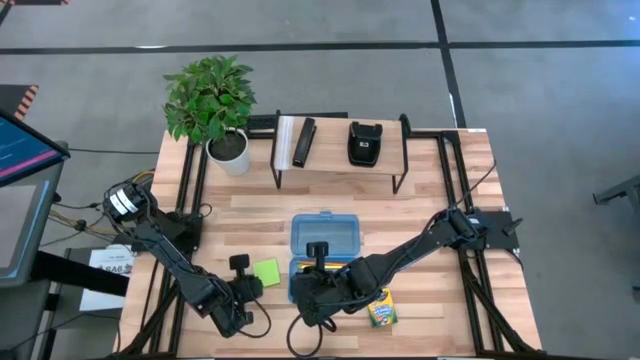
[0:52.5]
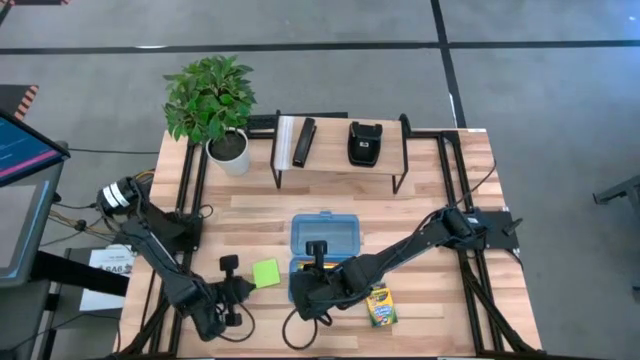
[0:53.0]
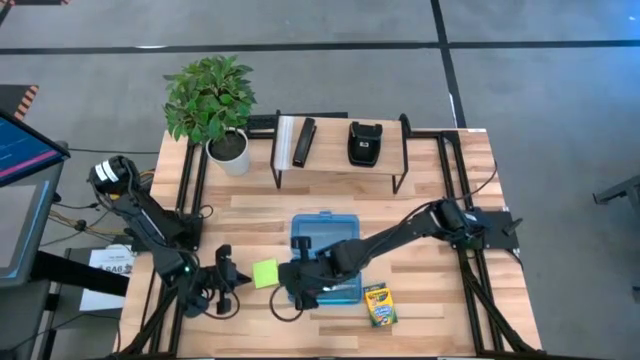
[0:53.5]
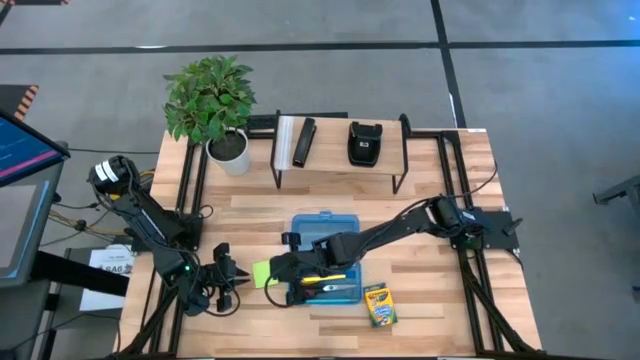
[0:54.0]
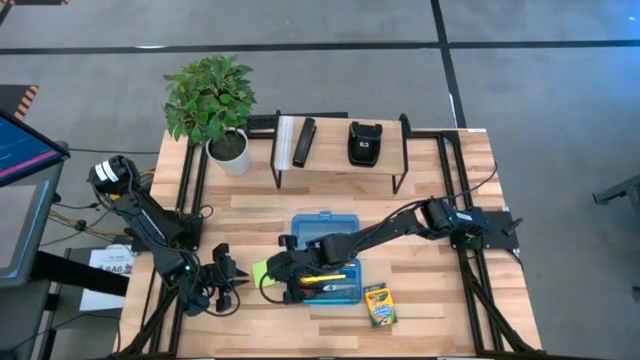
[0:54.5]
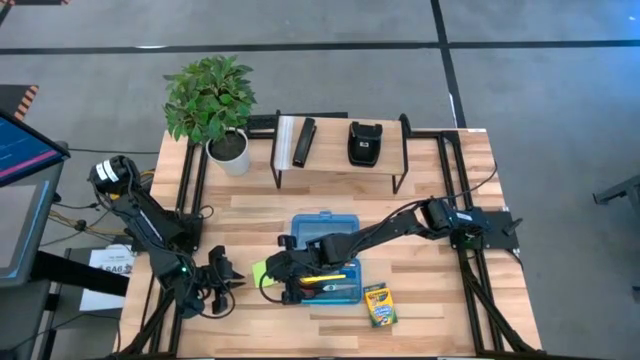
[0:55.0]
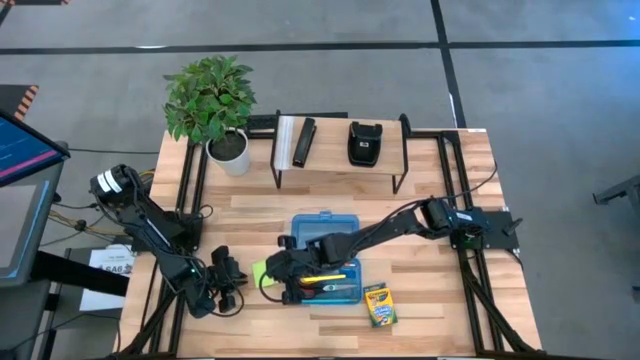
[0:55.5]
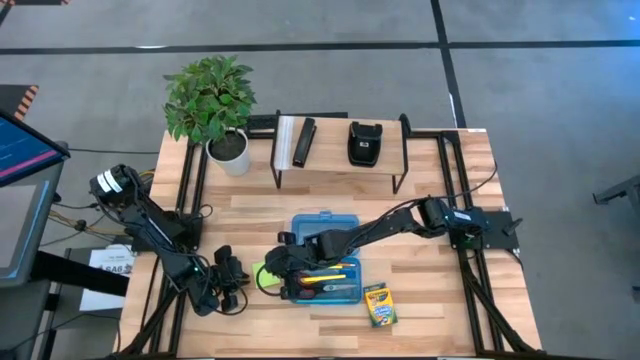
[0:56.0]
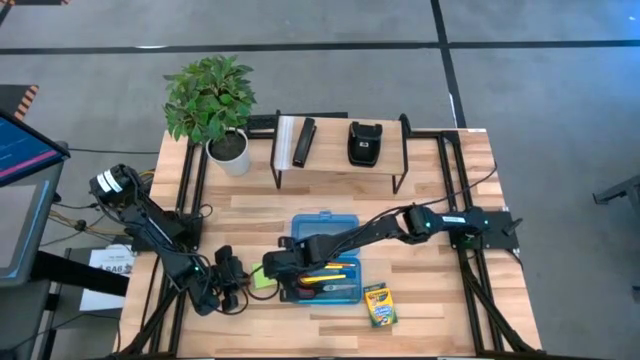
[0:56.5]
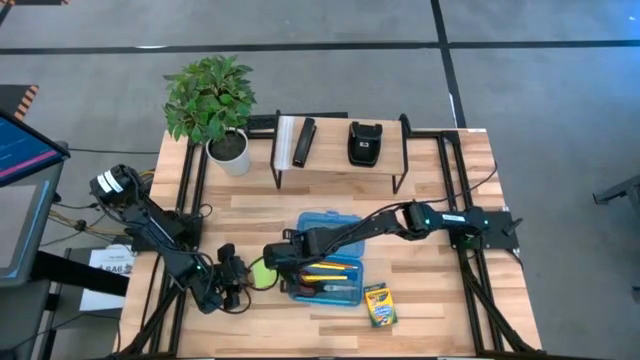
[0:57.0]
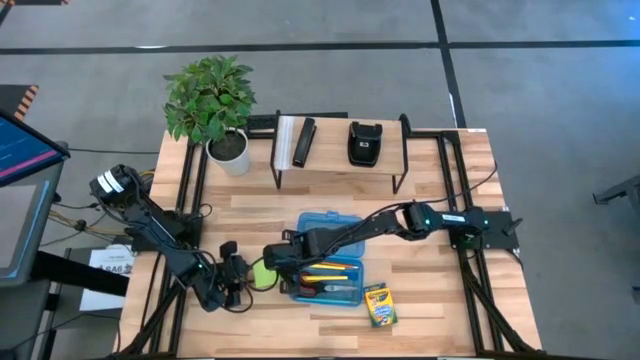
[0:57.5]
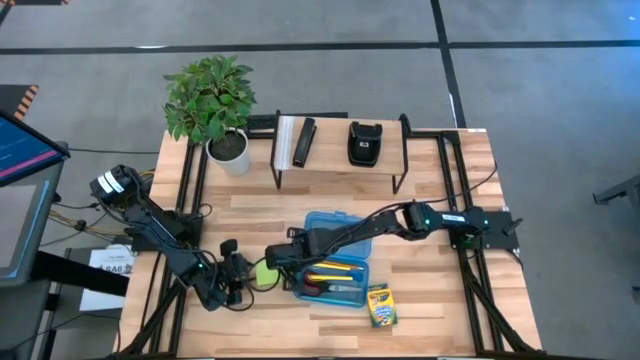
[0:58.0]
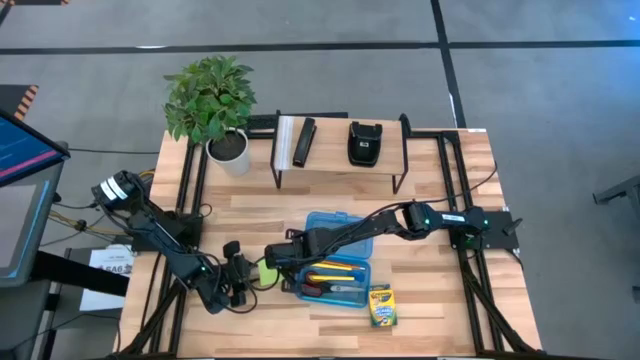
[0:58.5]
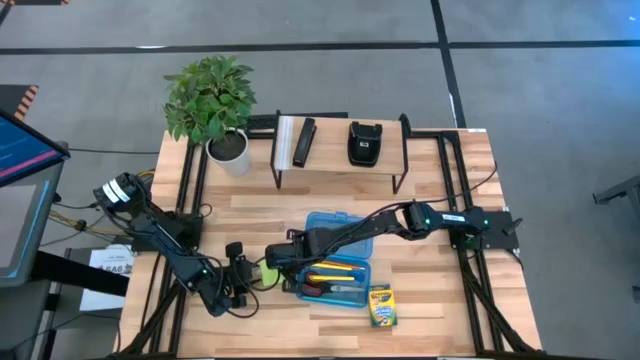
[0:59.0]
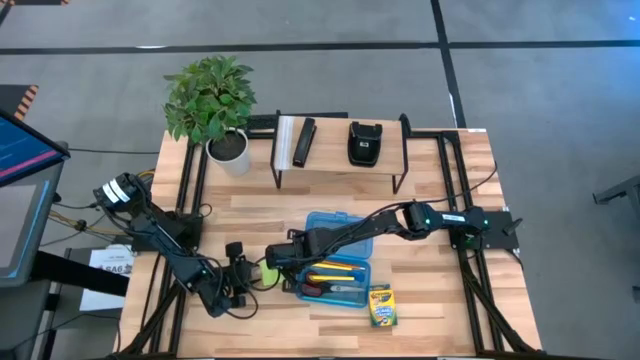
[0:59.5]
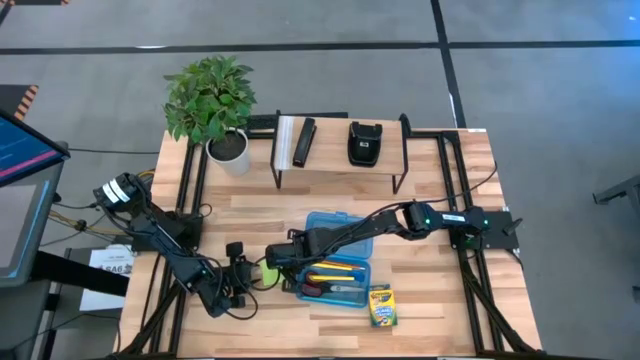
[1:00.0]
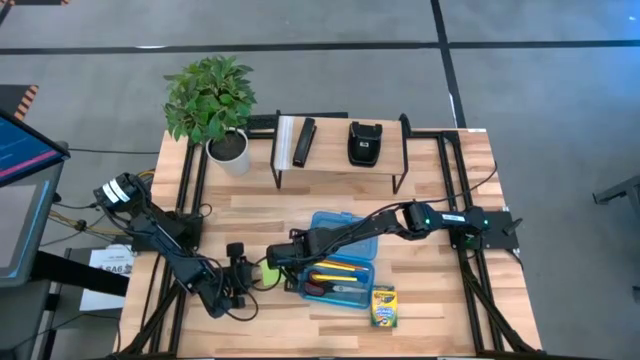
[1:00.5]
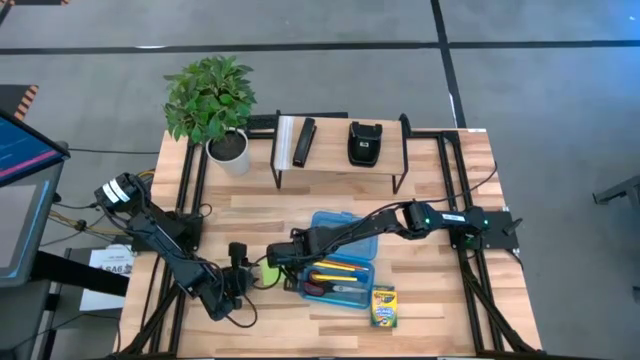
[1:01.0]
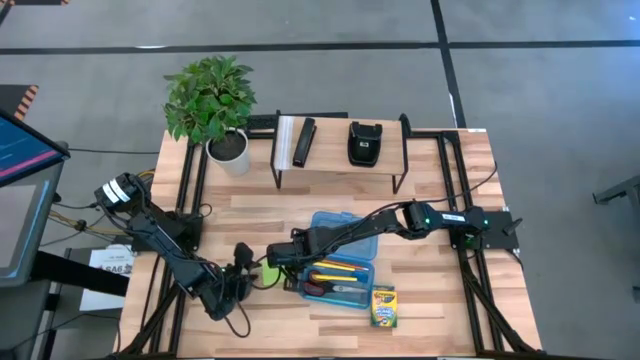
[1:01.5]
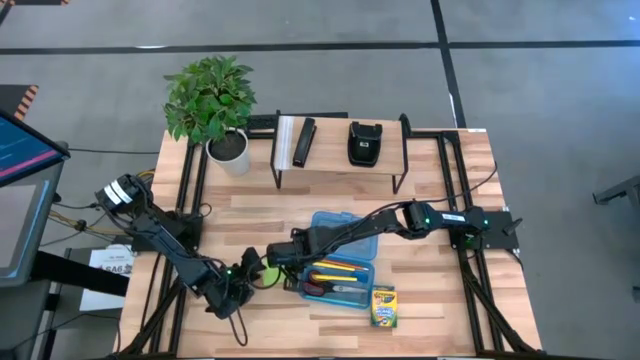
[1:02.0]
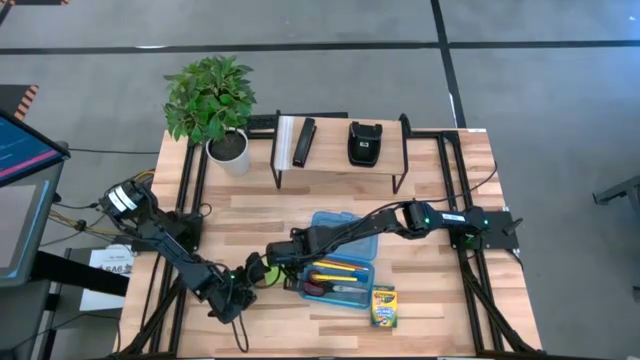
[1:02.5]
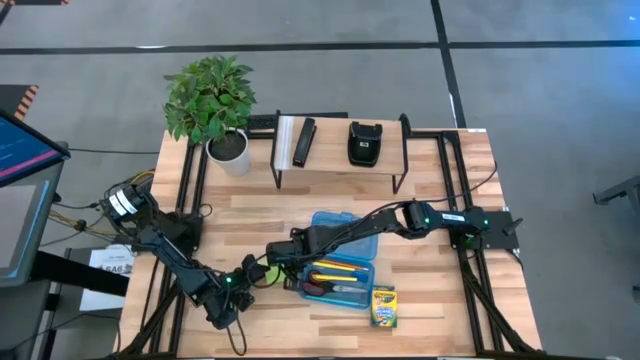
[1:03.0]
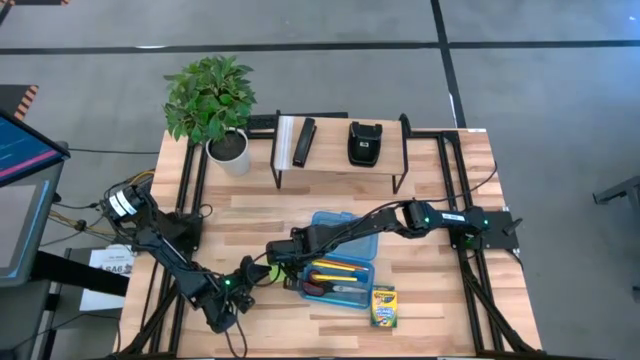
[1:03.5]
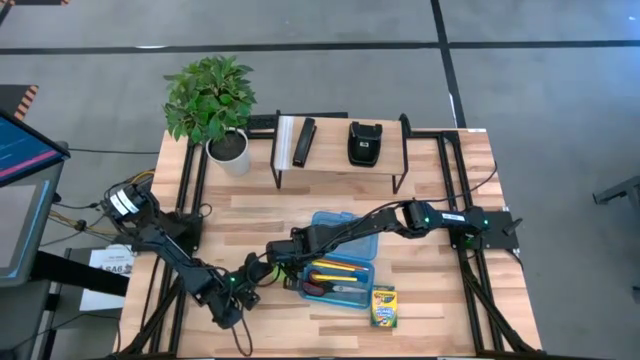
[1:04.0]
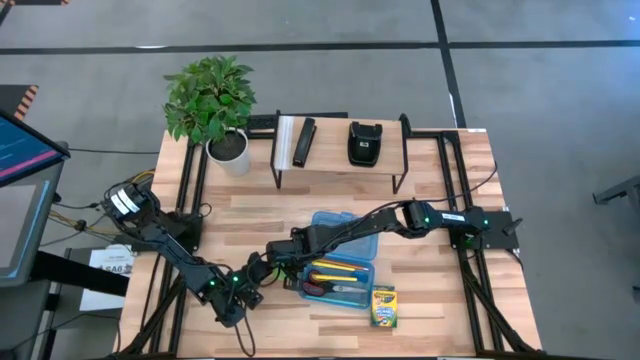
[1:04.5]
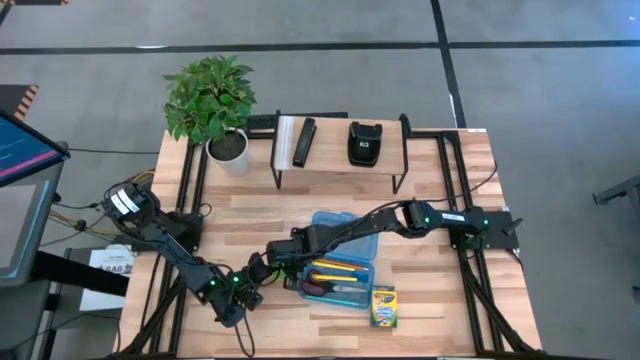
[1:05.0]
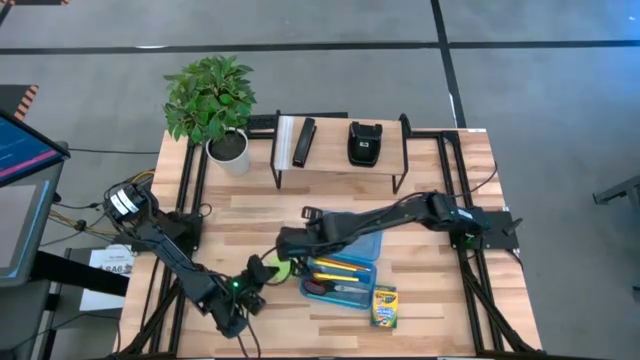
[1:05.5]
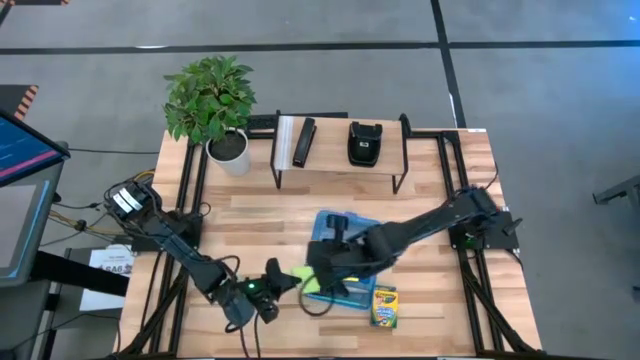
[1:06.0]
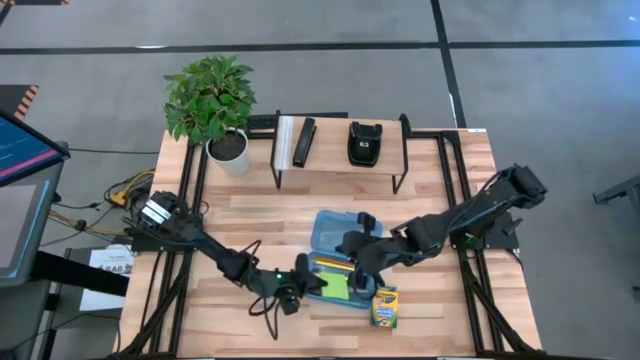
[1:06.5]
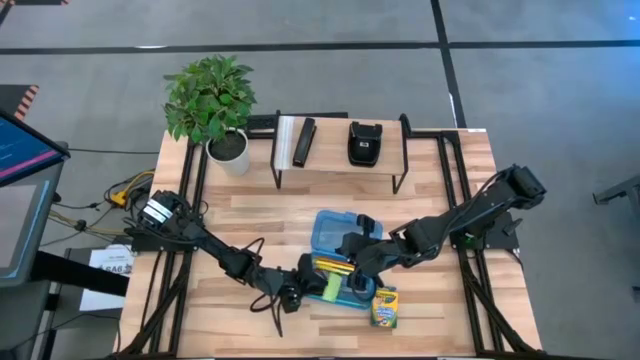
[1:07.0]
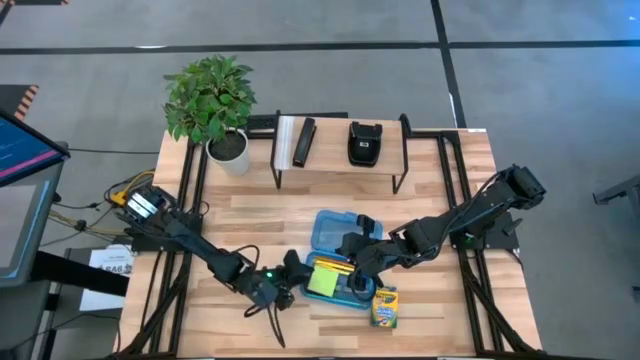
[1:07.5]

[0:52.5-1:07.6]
Task: Pack school essentials
Put the sticky note into the supply box

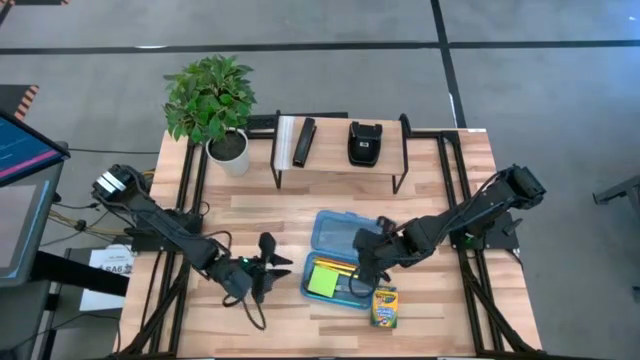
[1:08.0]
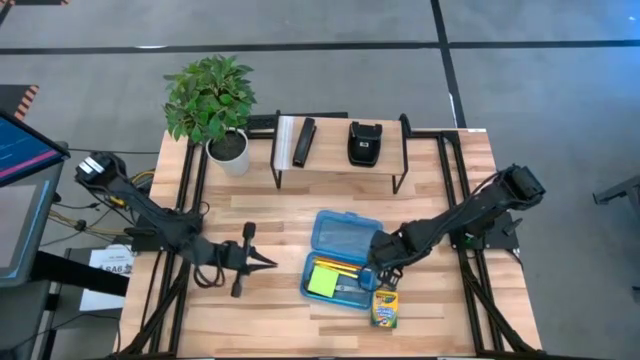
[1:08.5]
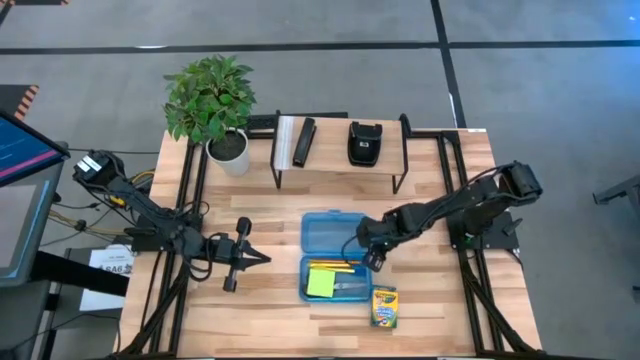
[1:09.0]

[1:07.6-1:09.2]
Adjust the blue supply box

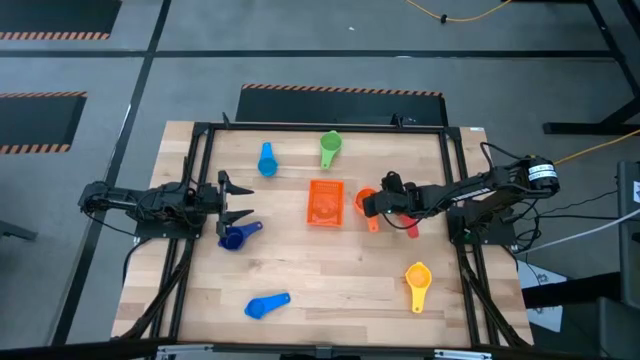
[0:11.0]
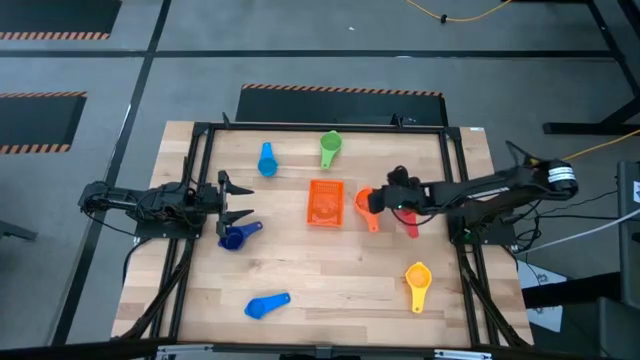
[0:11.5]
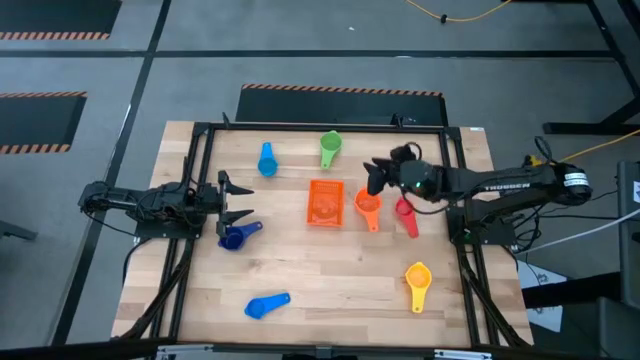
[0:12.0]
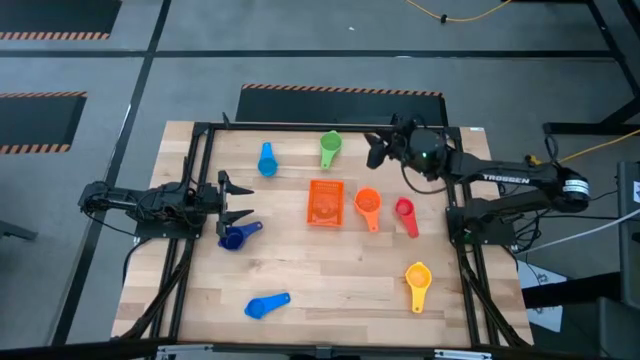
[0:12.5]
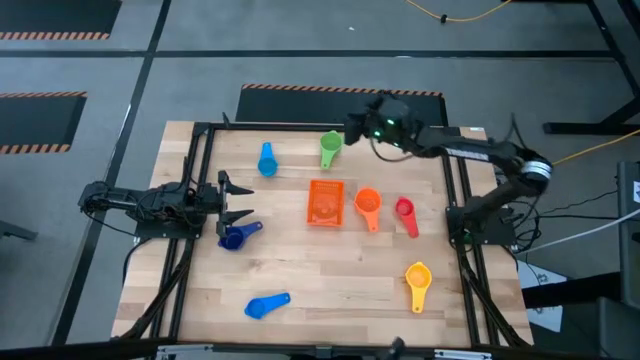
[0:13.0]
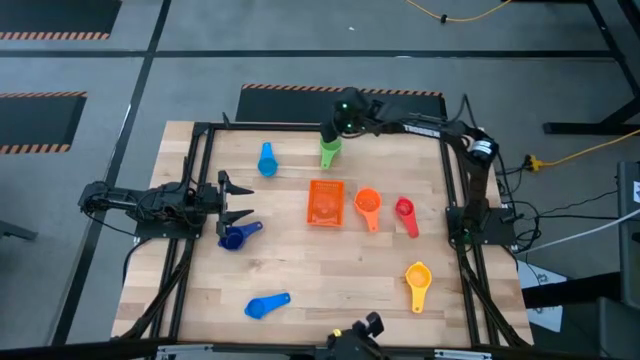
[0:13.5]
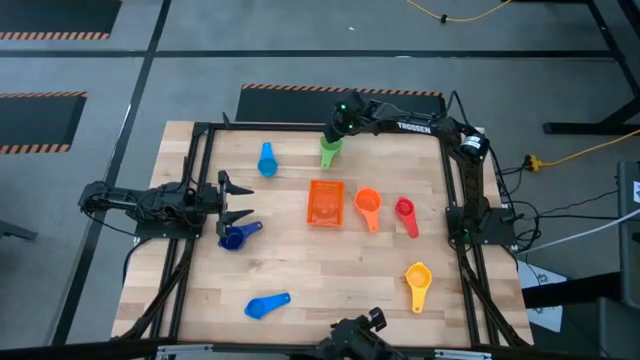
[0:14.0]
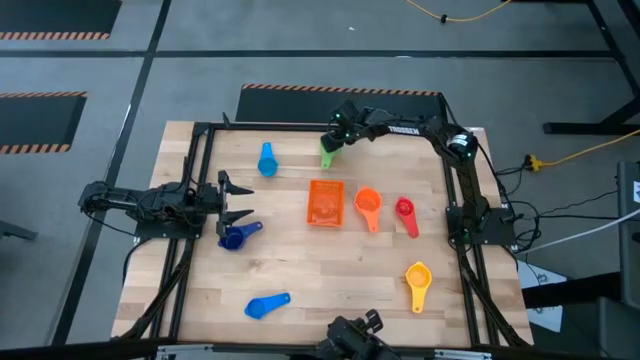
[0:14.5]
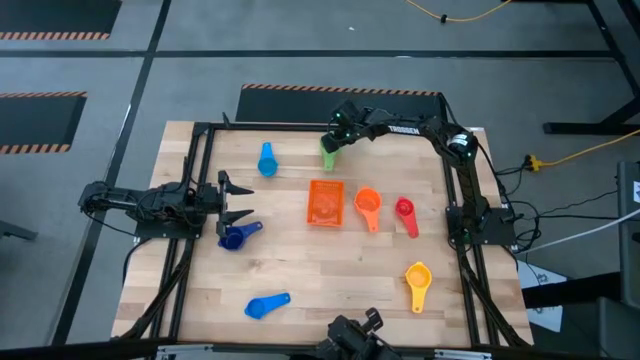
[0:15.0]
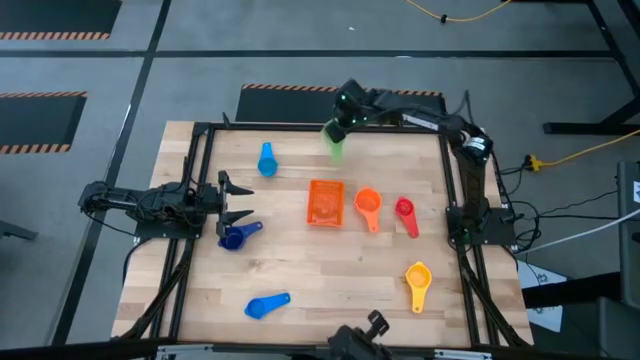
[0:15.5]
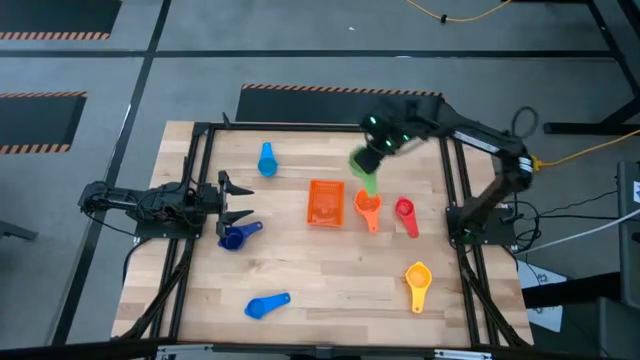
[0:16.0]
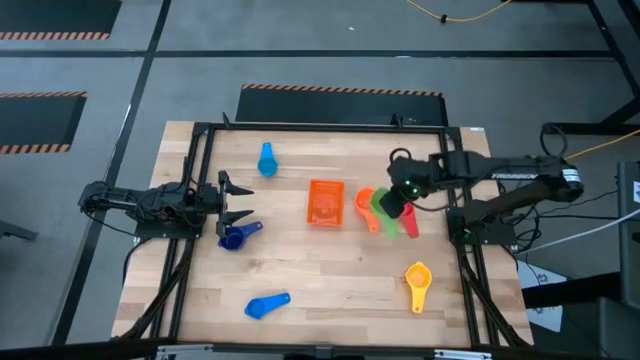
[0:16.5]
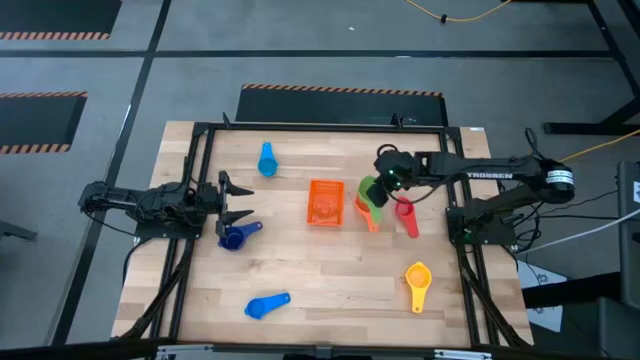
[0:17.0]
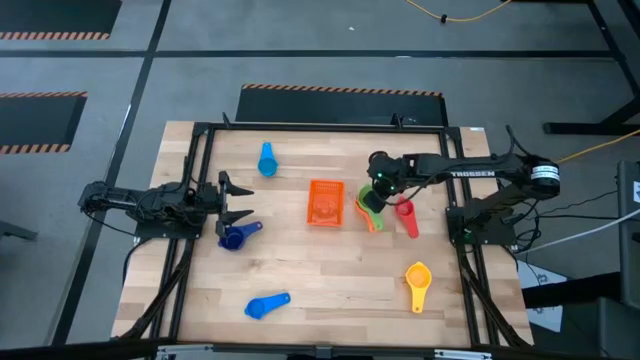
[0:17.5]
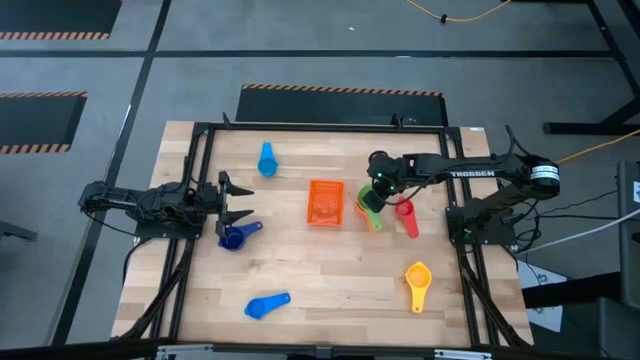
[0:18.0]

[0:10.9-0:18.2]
Task: Nest measuring cups in basket
Stack the green measuring cup on top of the orange measuring cup
